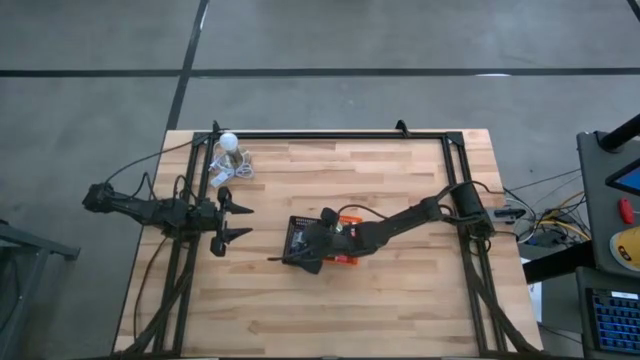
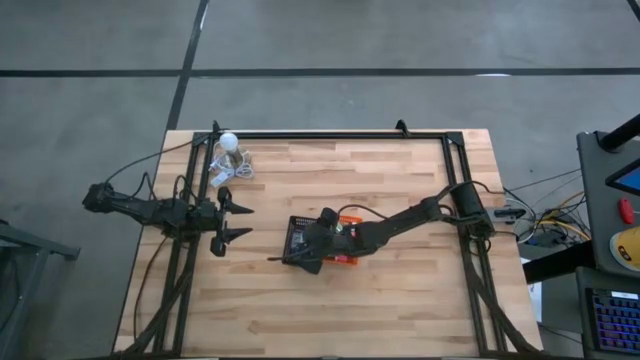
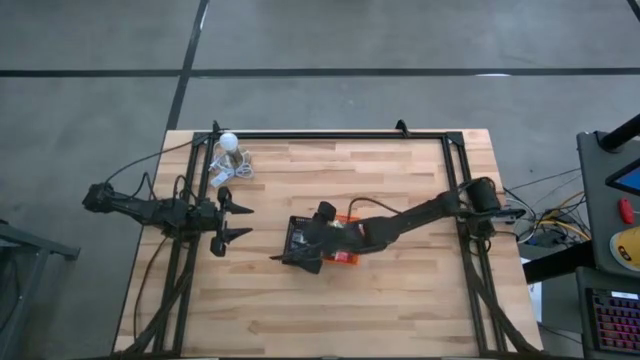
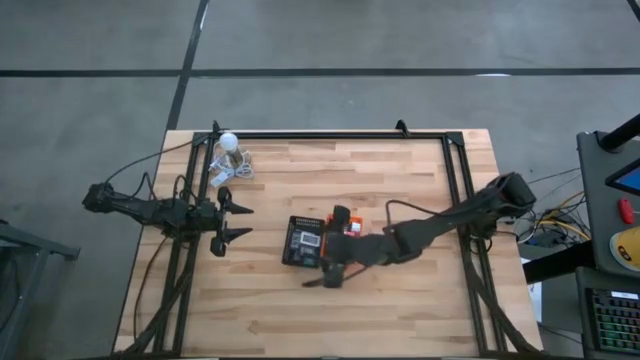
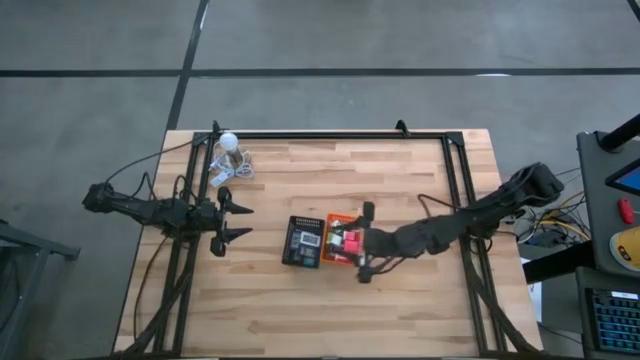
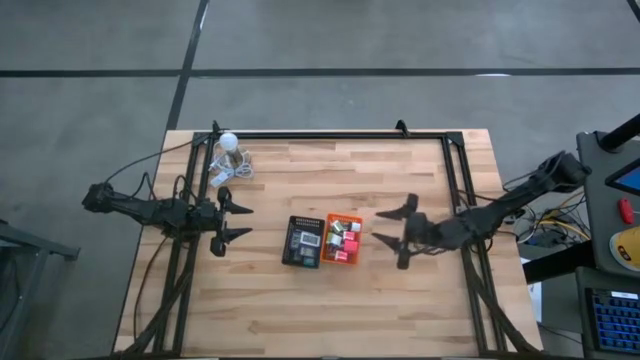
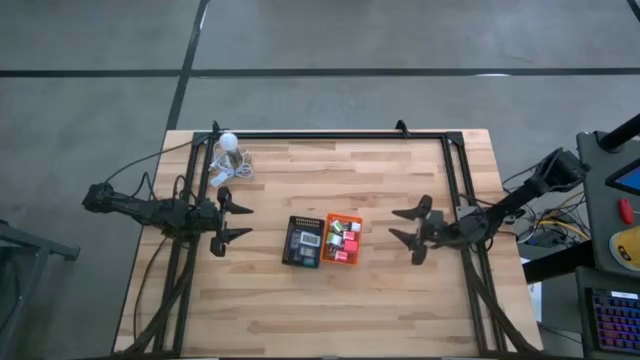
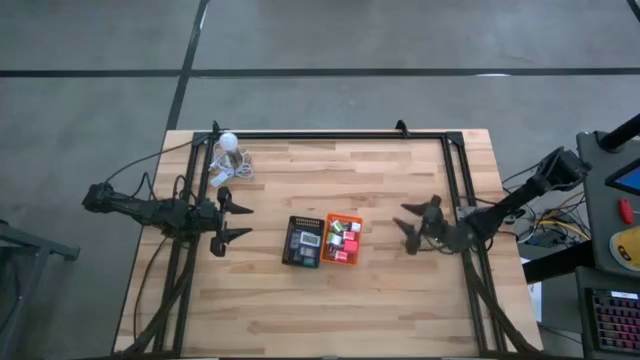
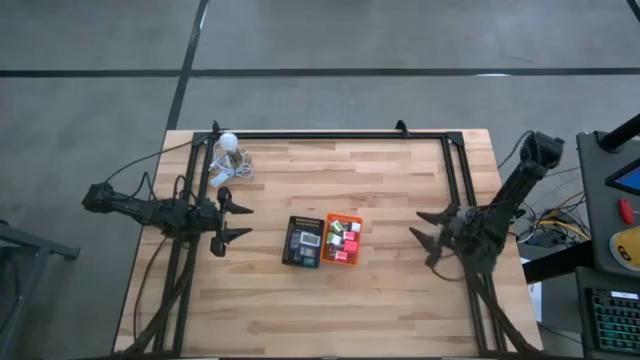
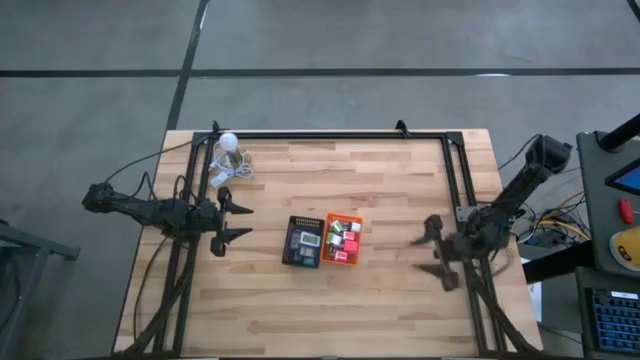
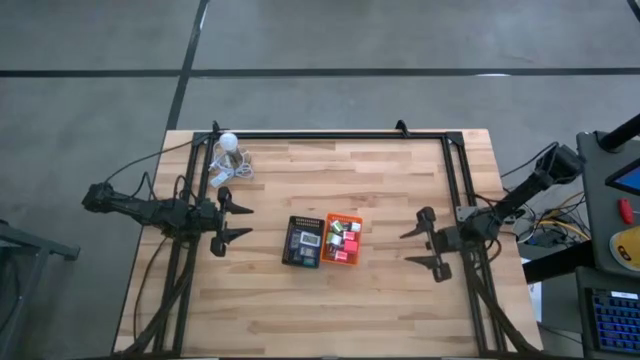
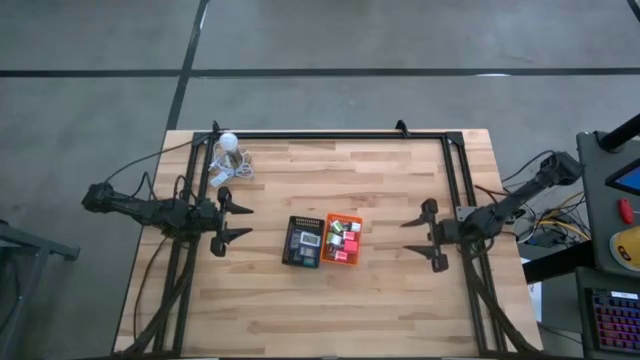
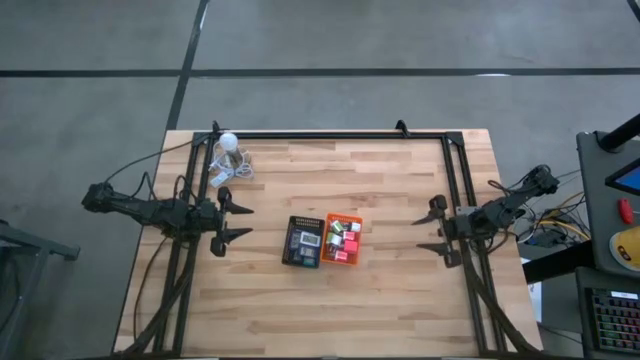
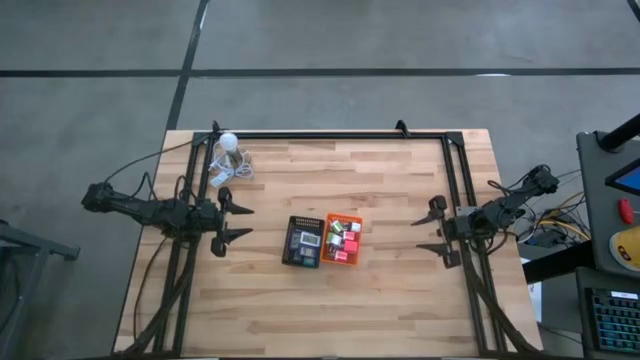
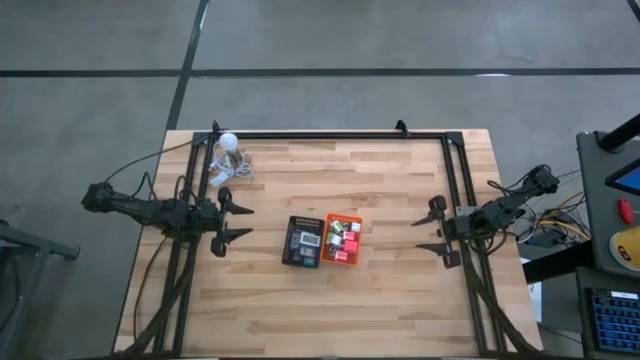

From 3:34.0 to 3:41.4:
Task: Pick & Place Office items
Return to Home Position

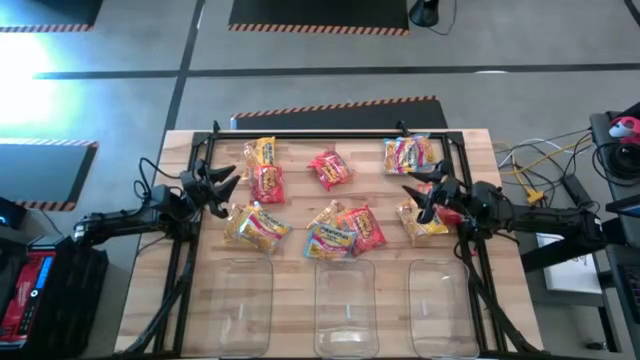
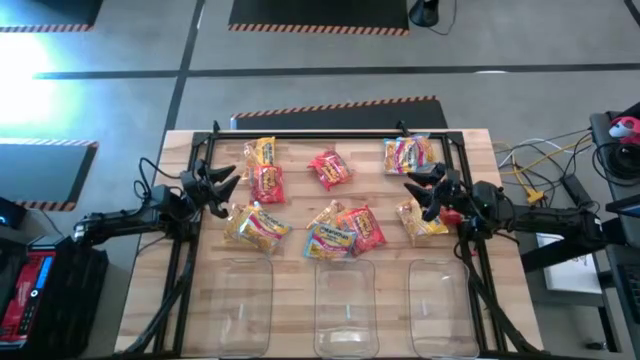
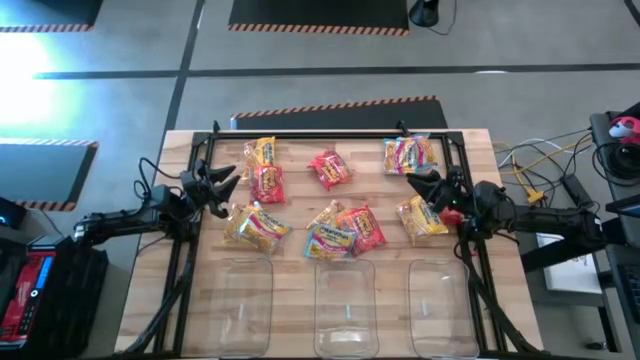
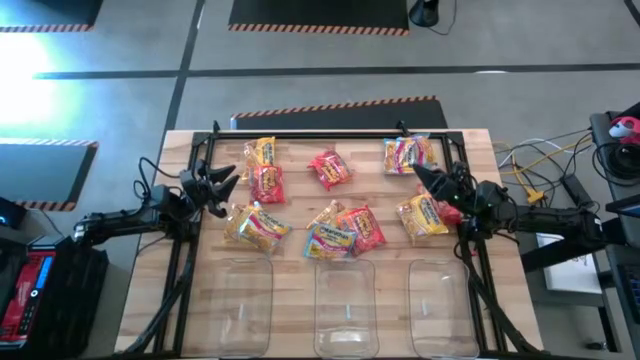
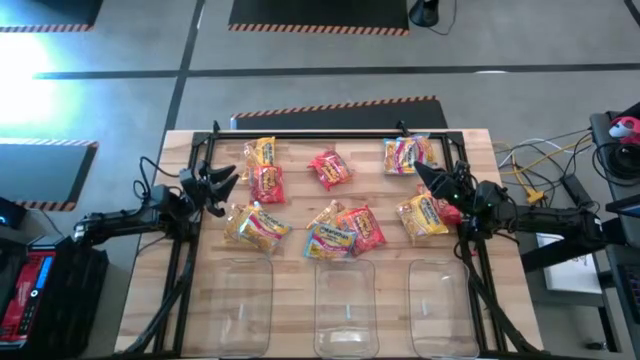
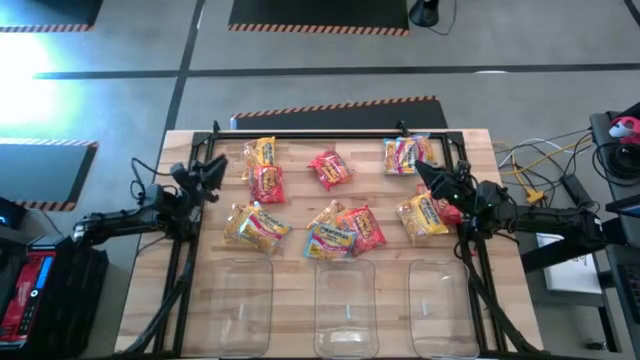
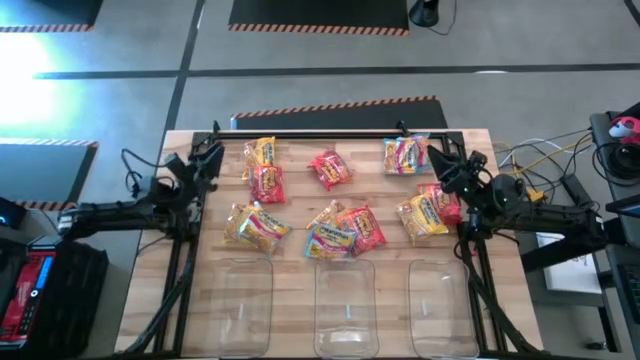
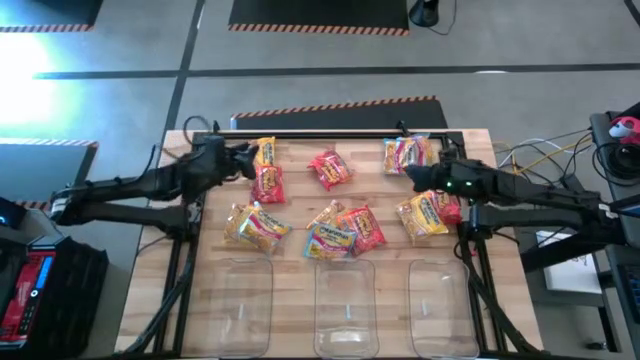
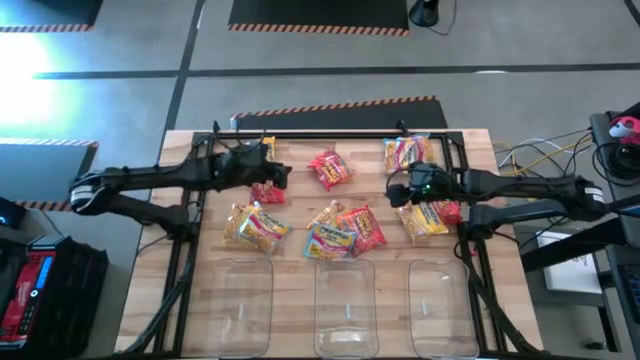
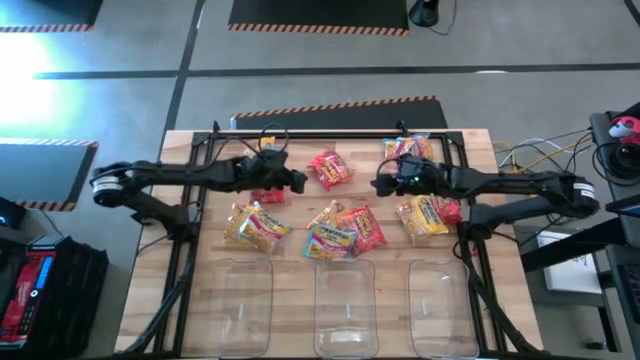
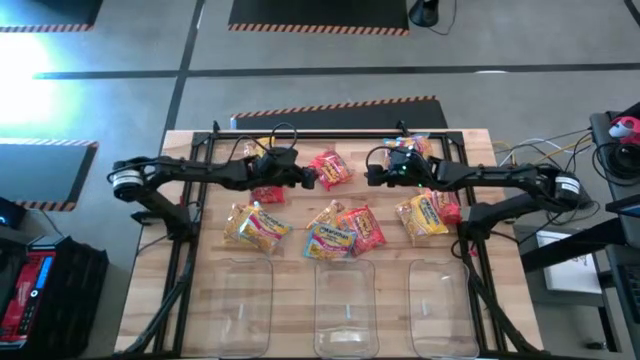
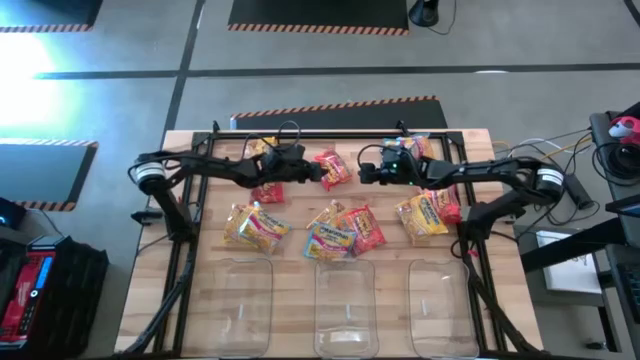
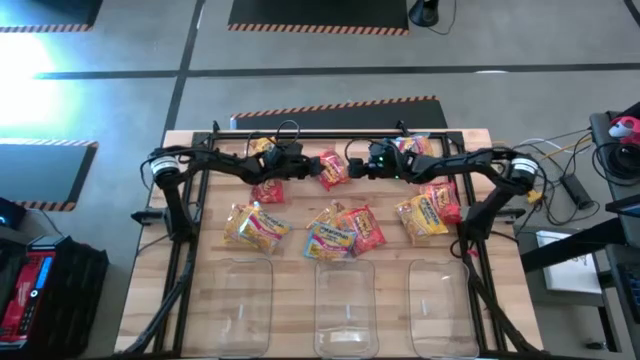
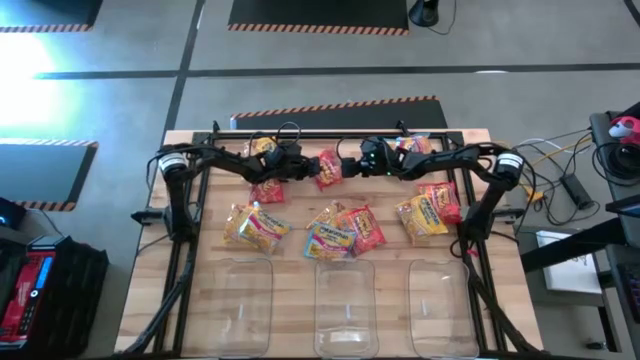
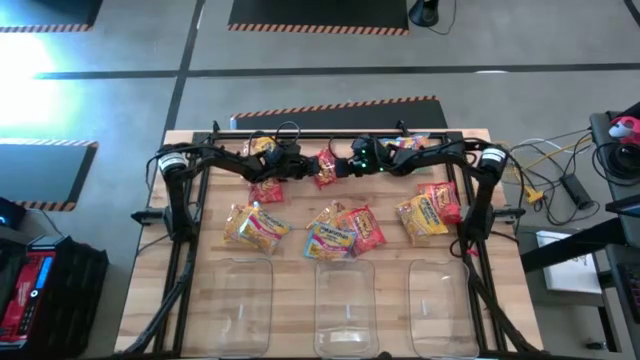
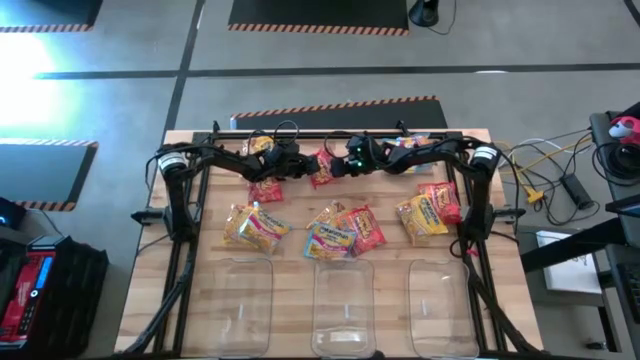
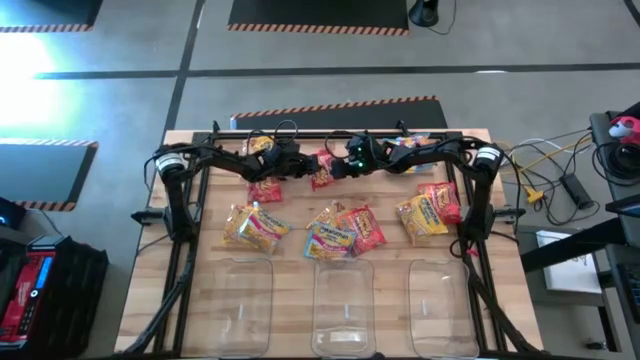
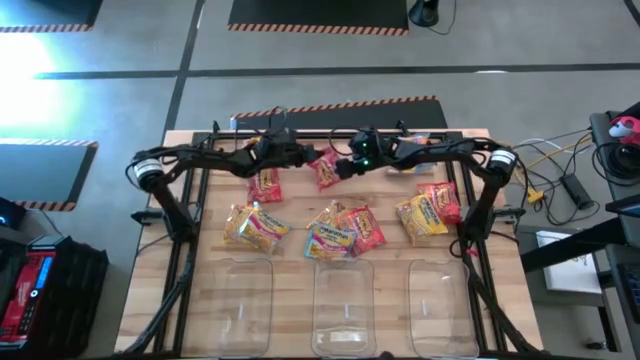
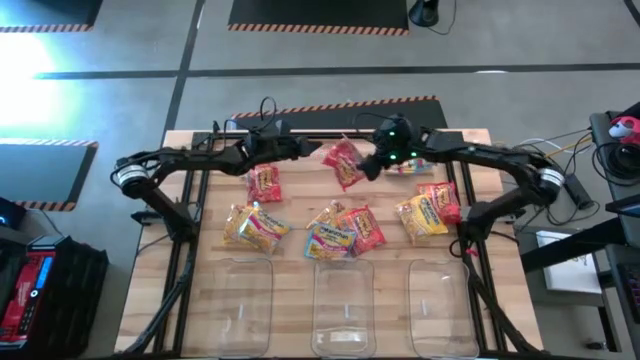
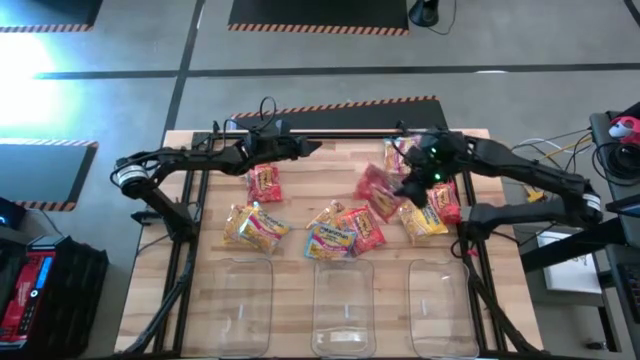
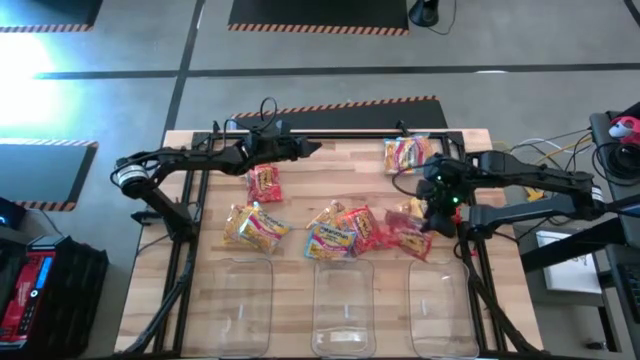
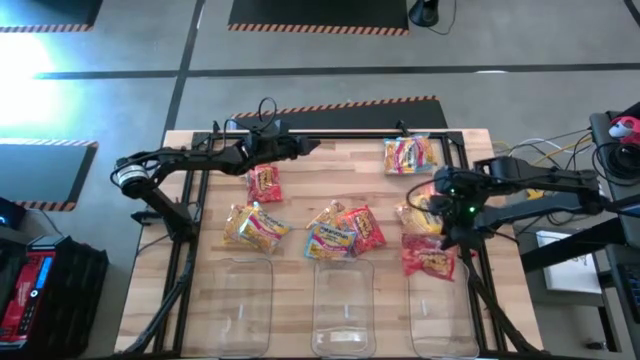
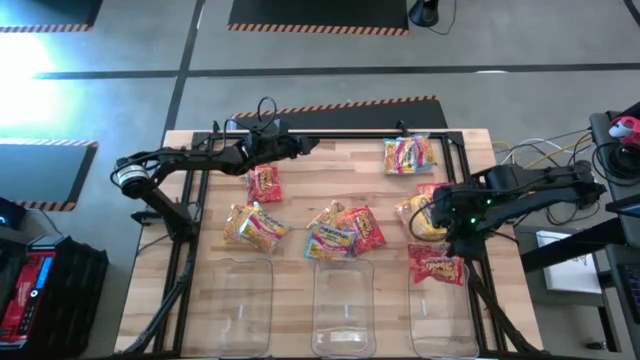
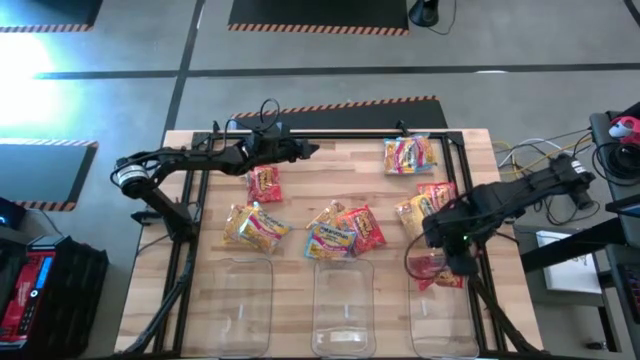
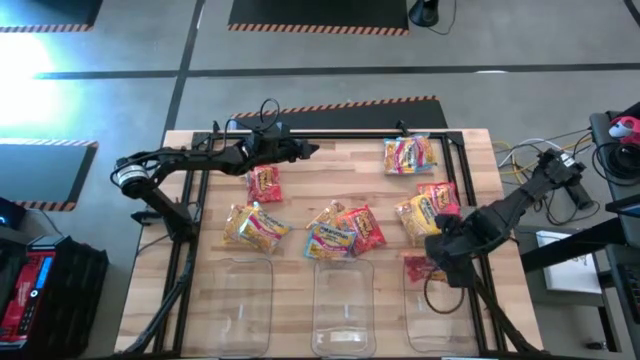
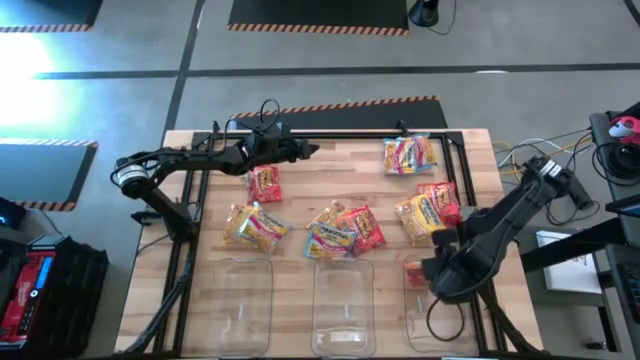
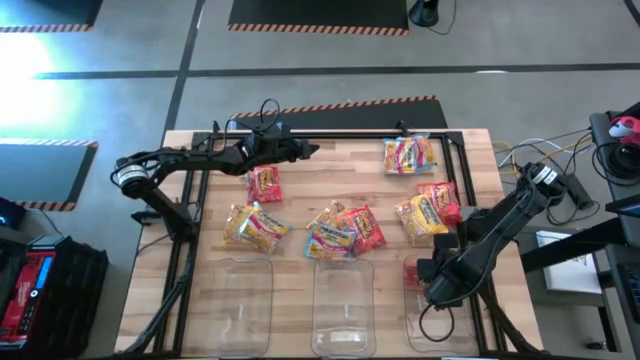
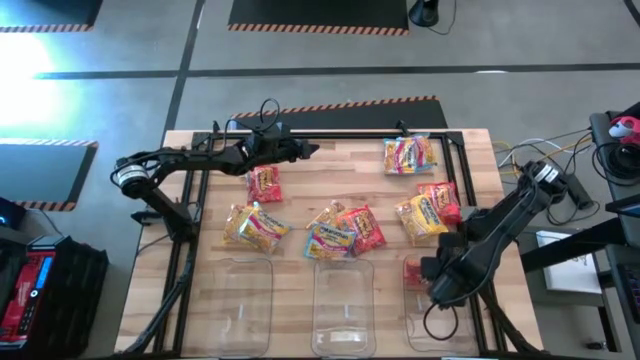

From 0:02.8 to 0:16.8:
Task: Sort Maruchan noodles
Put the orange noodle pack into the right transparent bin
